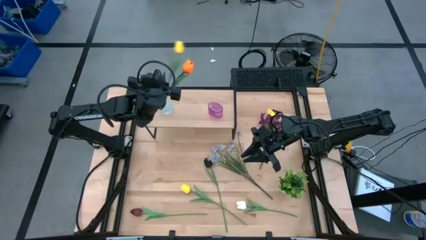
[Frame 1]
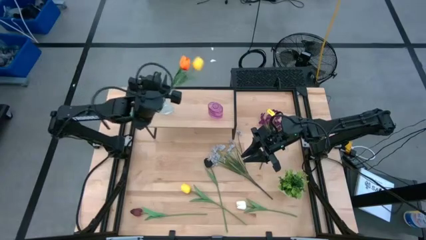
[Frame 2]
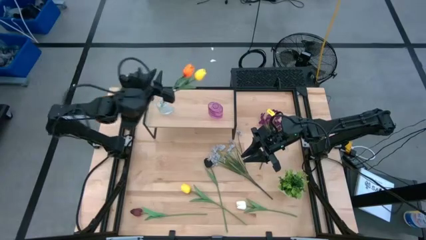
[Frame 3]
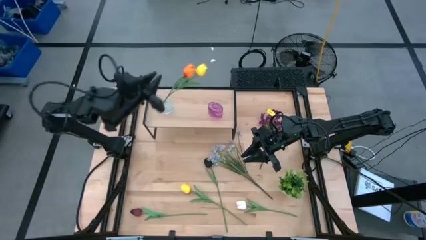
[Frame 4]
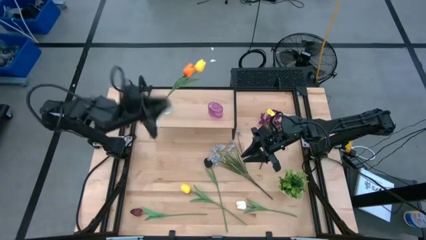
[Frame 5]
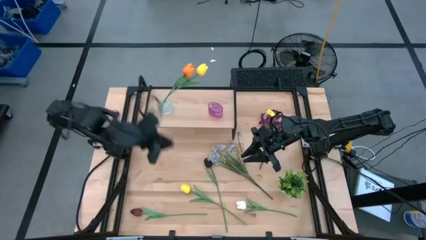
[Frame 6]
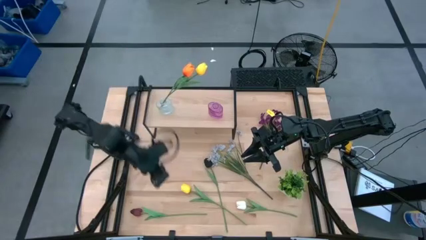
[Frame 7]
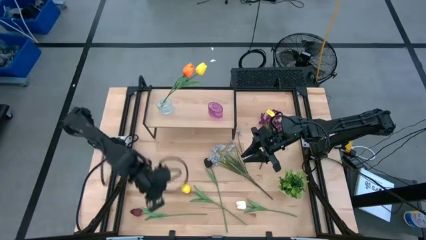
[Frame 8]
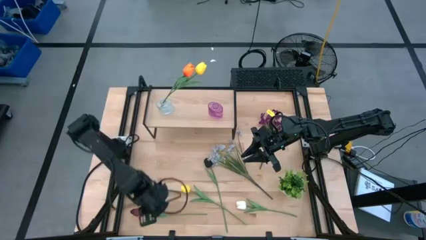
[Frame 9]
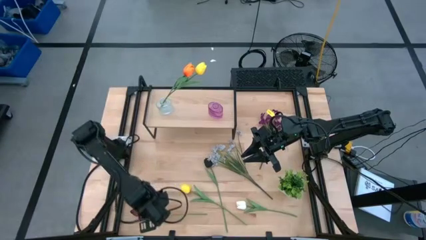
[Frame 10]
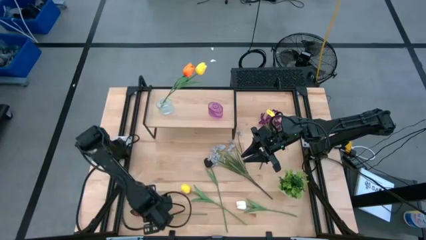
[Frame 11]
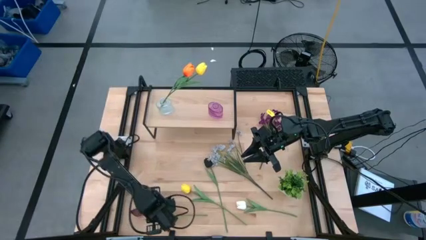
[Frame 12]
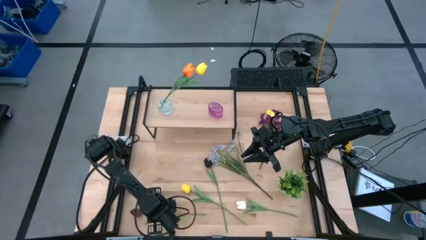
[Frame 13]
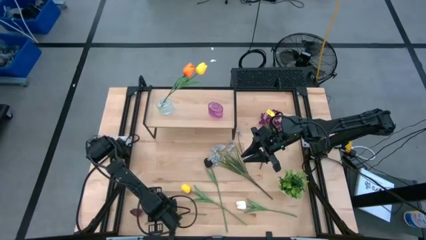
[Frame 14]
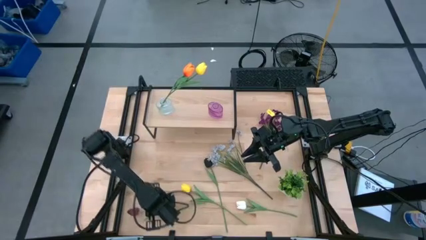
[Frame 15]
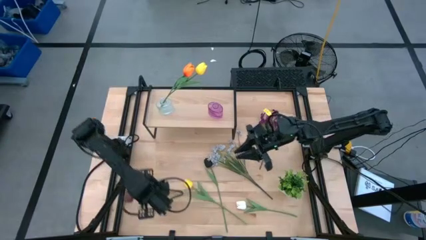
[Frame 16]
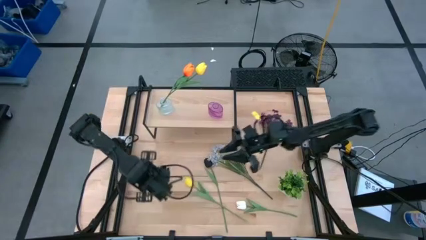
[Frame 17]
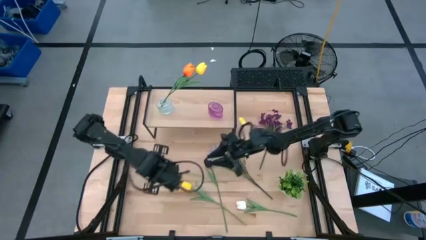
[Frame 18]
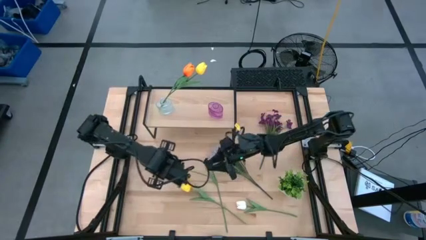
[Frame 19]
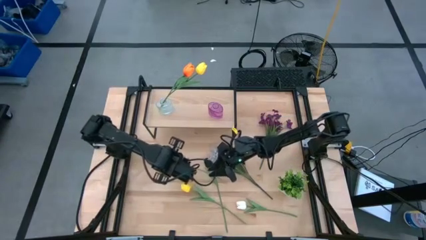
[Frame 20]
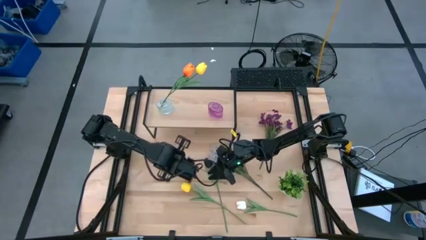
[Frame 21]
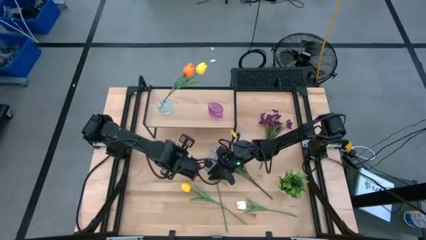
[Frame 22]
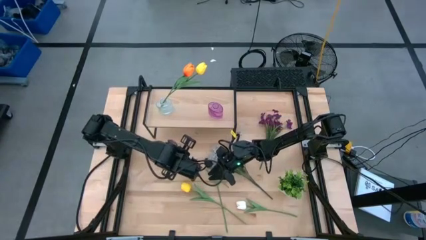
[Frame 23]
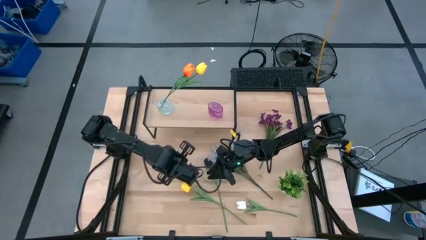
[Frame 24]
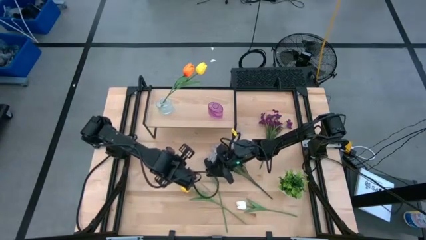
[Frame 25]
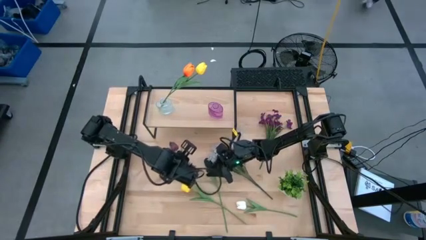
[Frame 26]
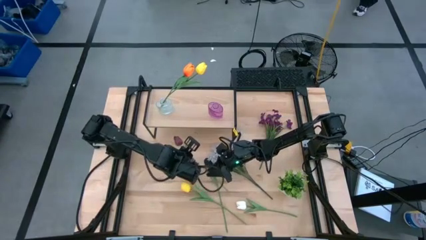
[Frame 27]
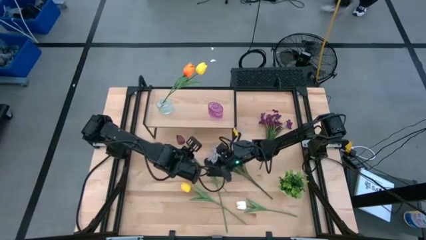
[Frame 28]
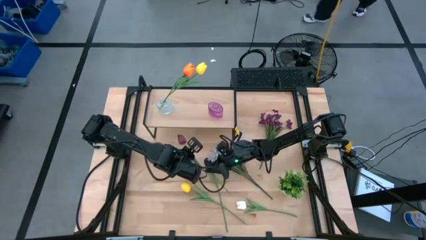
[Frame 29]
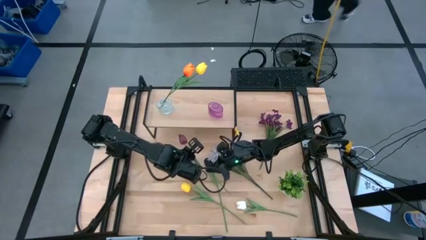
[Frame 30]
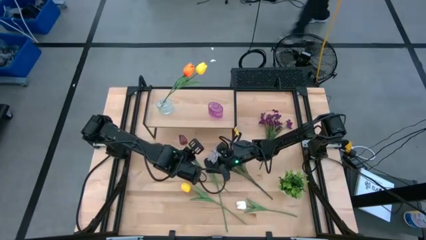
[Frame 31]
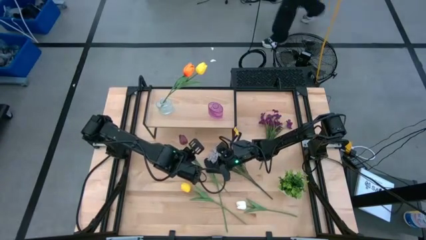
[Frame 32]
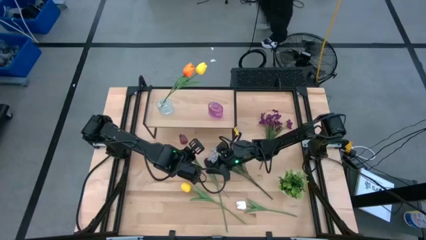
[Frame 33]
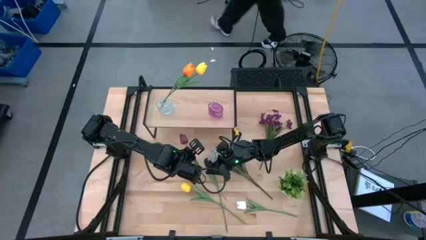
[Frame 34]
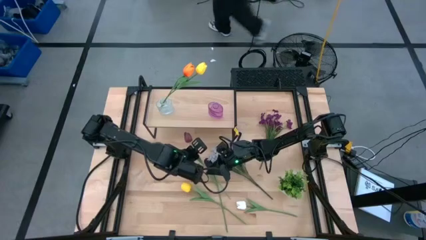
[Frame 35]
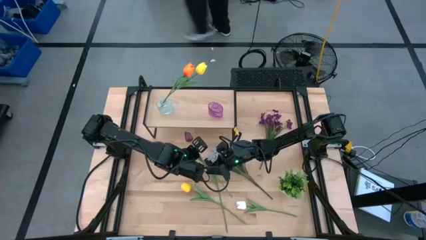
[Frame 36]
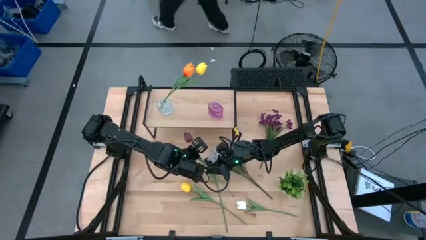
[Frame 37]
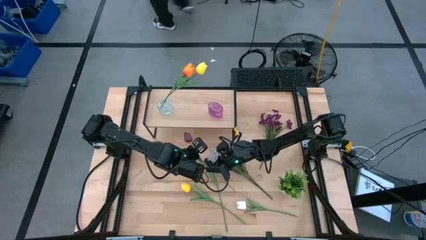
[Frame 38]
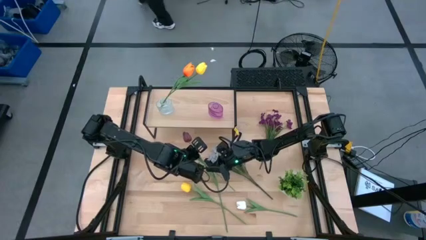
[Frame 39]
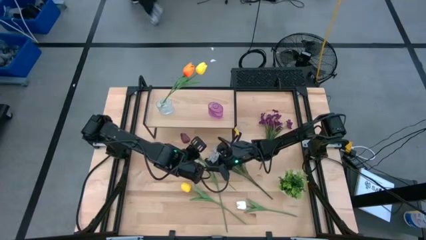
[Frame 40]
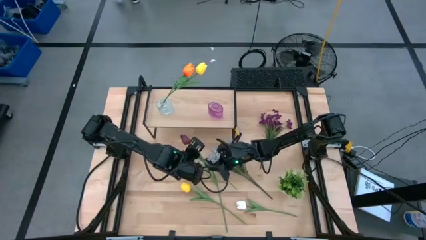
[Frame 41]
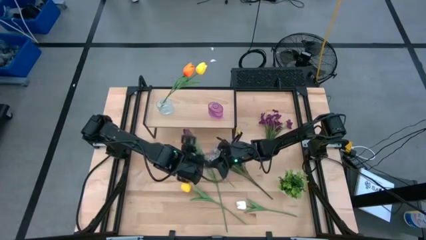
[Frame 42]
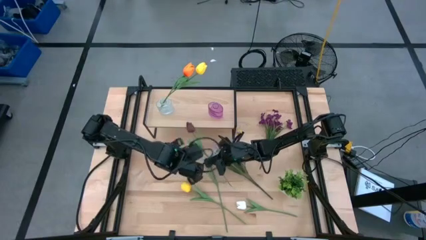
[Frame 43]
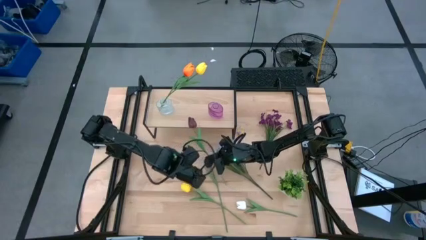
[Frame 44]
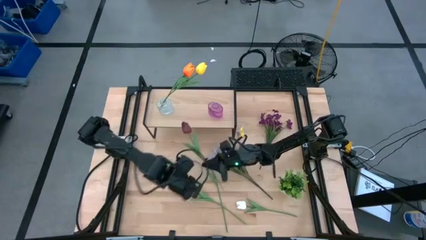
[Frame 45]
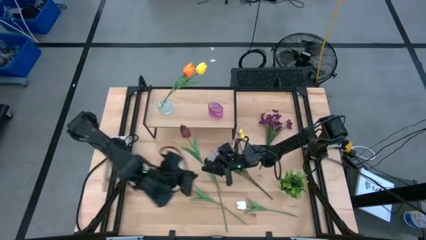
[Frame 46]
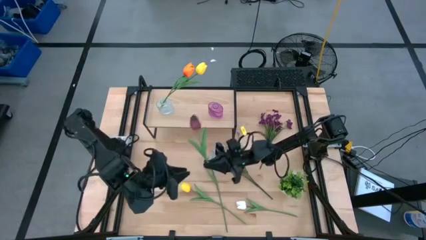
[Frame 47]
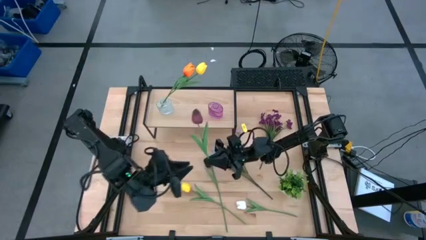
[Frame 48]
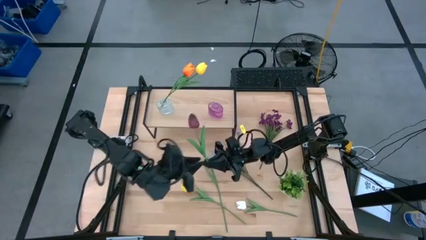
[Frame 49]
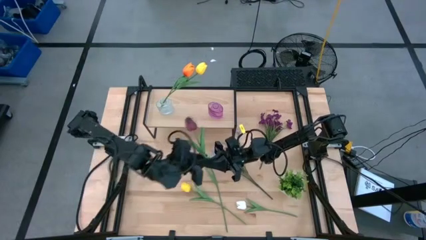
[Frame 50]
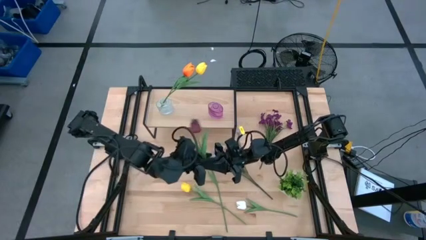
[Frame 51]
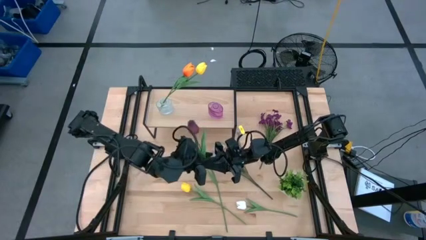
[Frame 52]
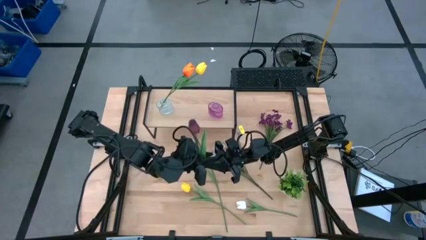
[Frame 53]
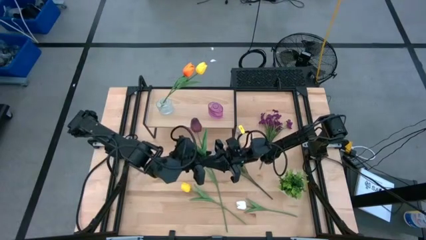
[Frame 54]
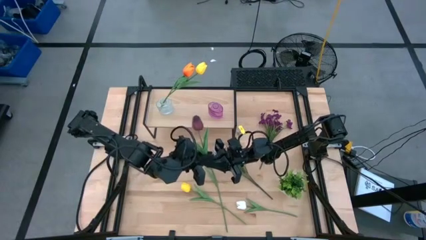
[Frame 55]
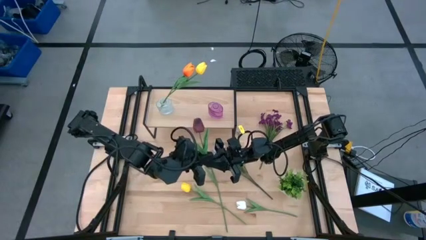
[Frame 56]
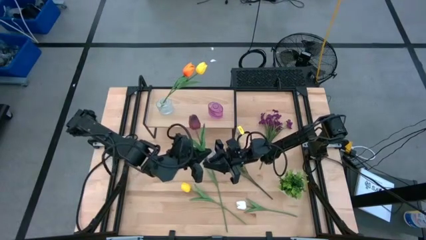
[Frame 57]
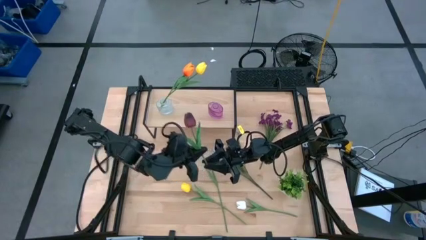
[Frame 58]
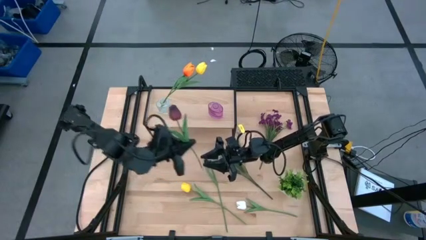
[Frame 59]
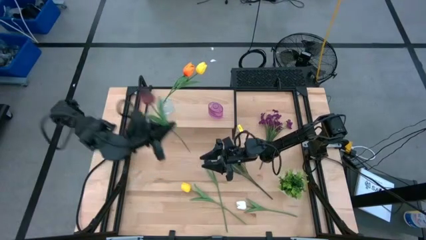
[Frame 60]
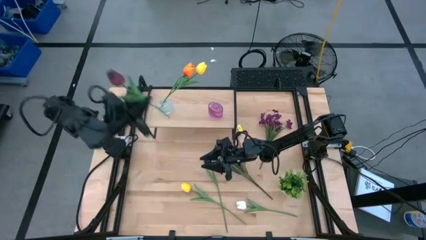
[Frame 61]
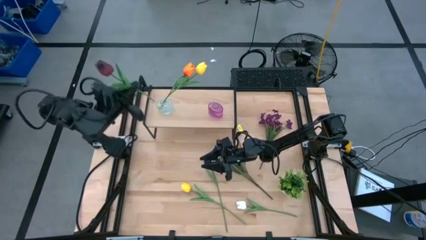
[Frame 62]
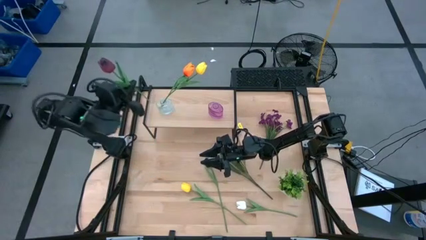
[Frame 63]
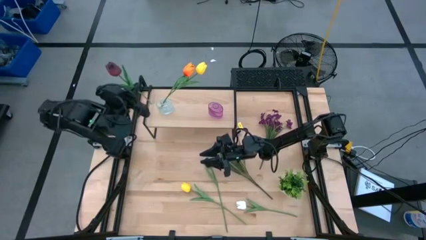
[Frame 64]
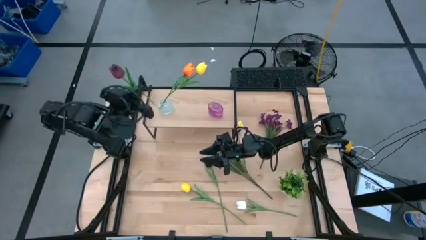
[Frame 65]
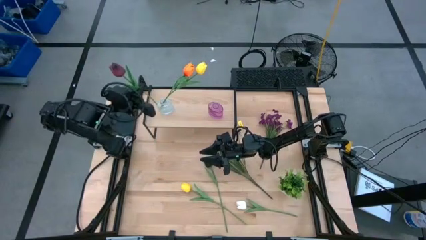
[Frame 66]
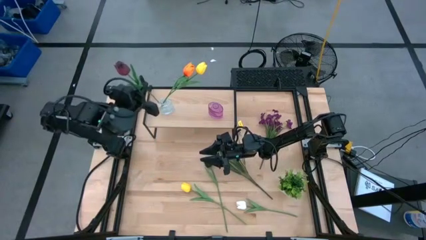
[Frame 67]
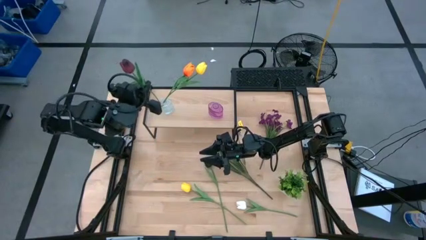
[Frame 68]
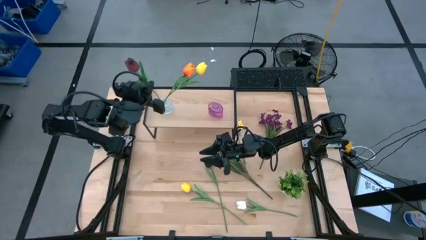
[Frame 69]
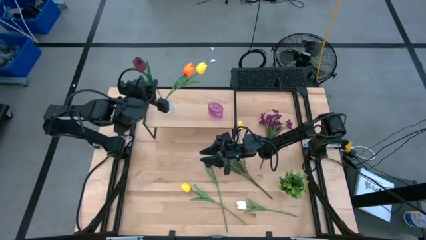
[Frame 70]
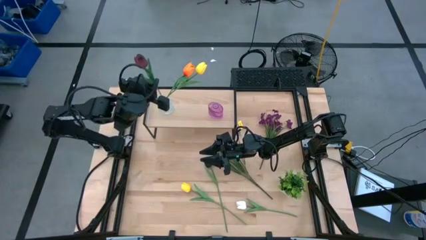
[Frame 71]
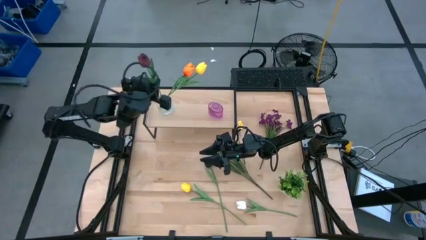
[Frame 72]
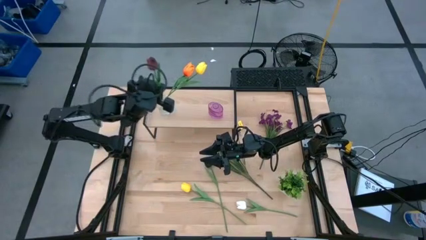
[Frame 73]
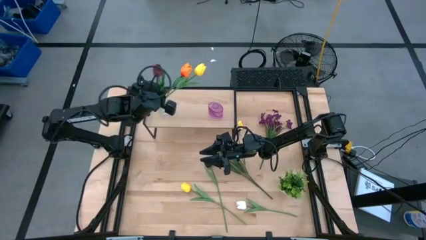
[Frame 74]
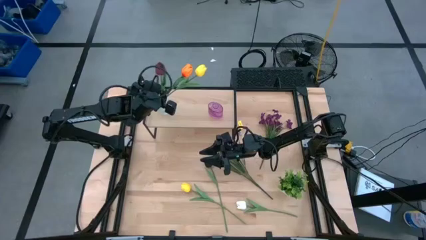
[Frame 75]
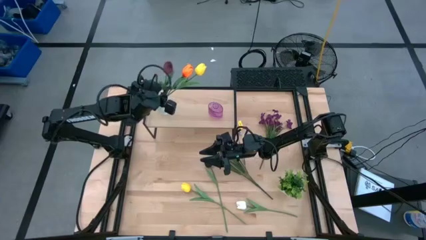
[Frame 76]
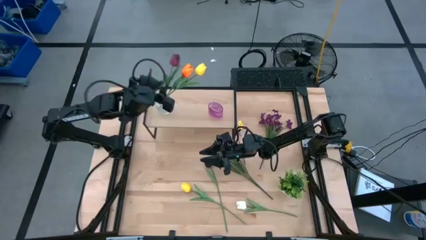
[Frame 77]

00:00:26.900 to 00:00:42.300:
Task: Pick and place flowers into a vace then onto a shelf
Put the red flower into the transparent vase on the shelf
